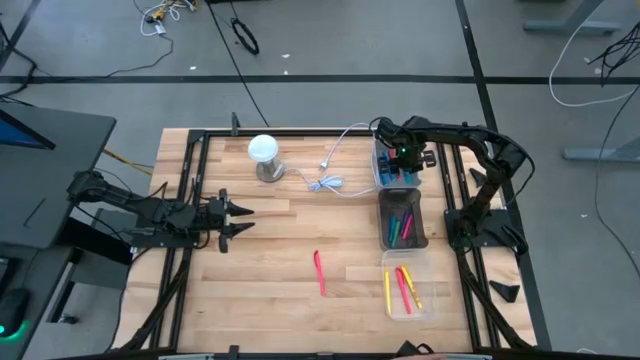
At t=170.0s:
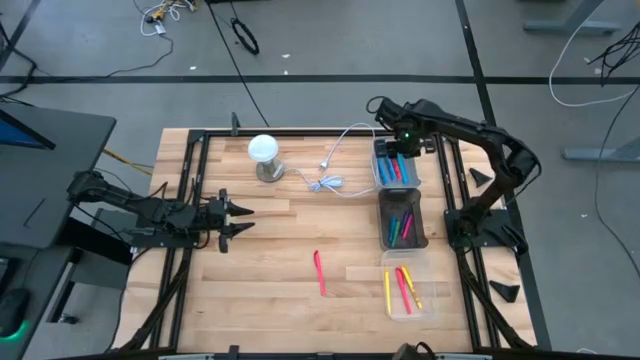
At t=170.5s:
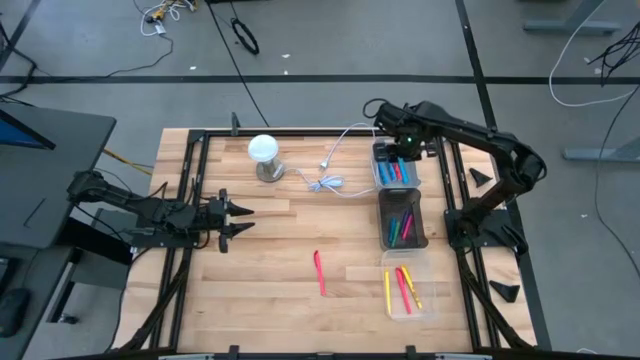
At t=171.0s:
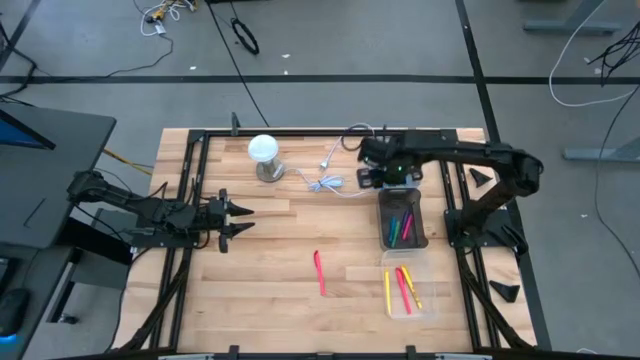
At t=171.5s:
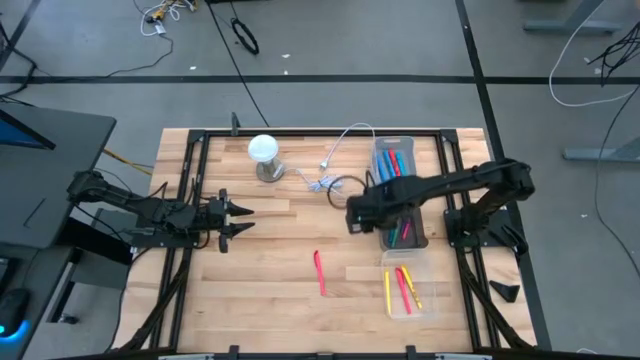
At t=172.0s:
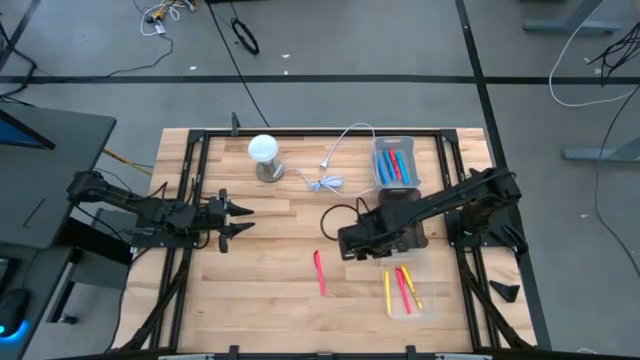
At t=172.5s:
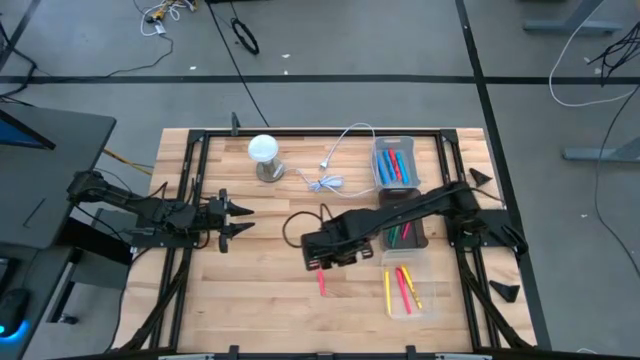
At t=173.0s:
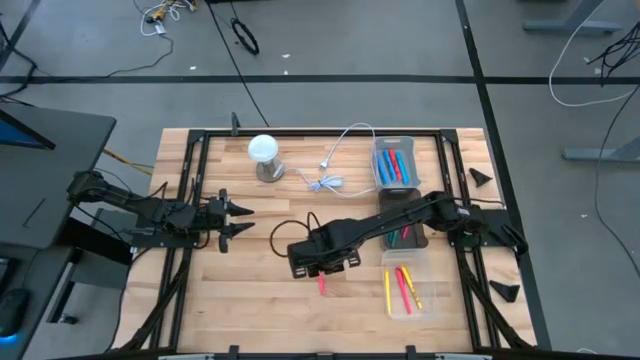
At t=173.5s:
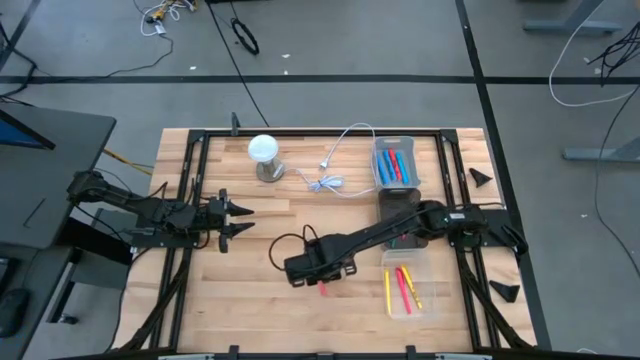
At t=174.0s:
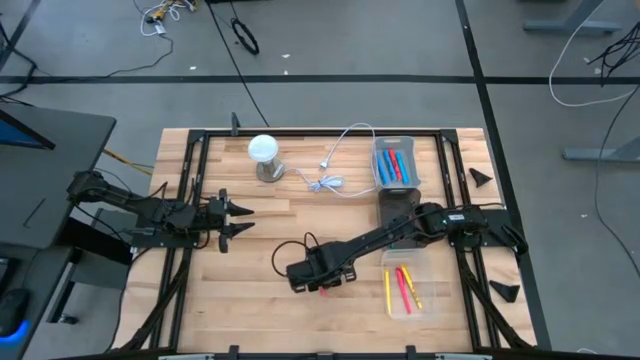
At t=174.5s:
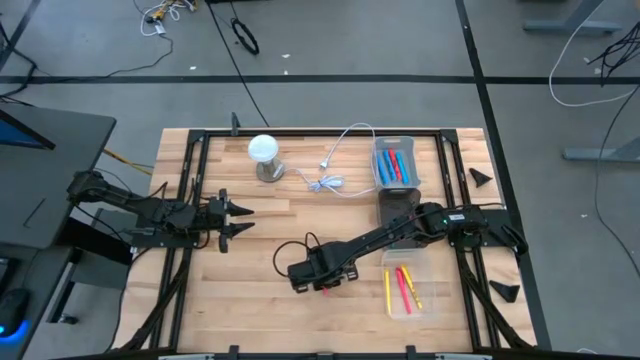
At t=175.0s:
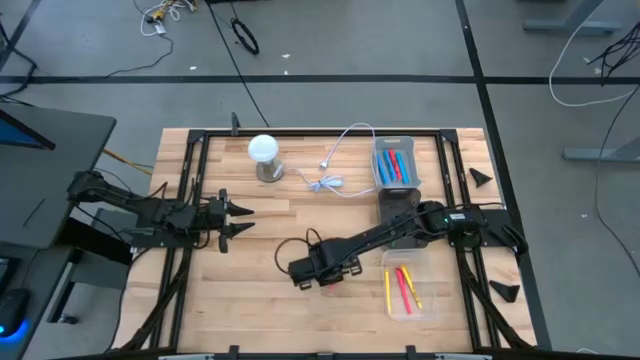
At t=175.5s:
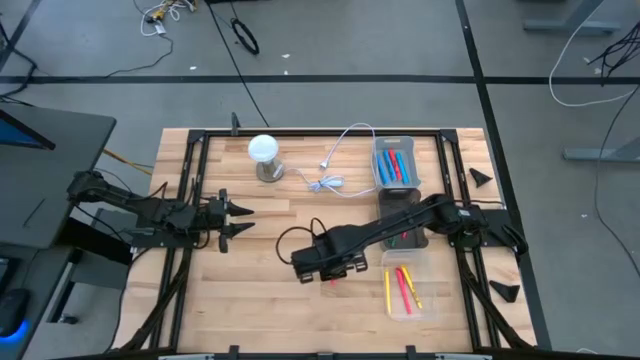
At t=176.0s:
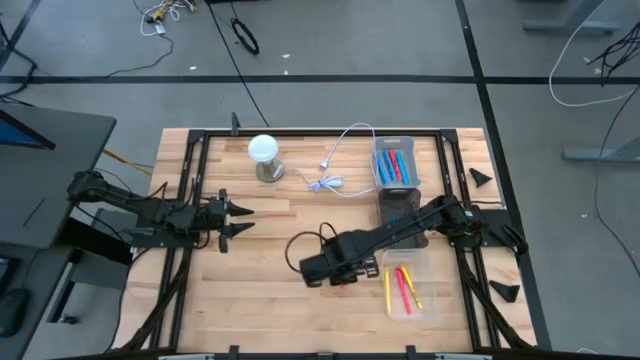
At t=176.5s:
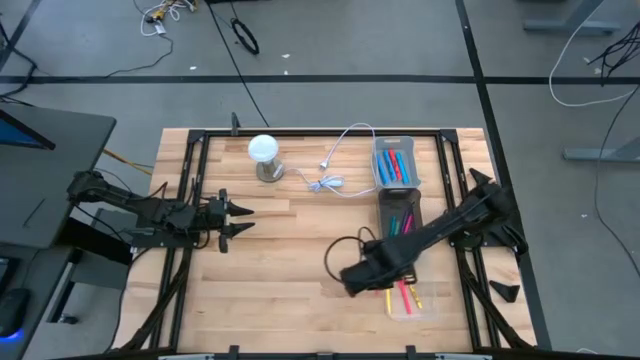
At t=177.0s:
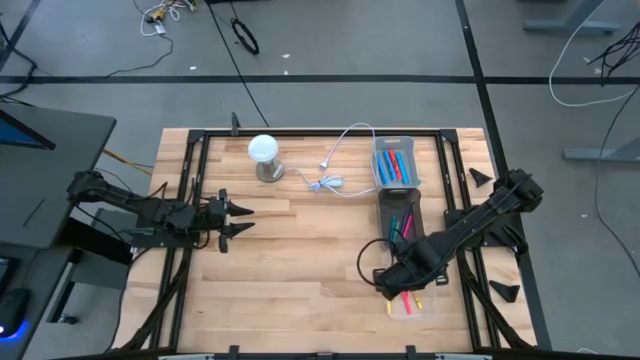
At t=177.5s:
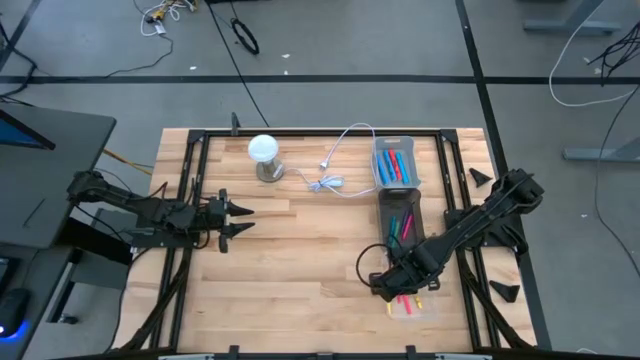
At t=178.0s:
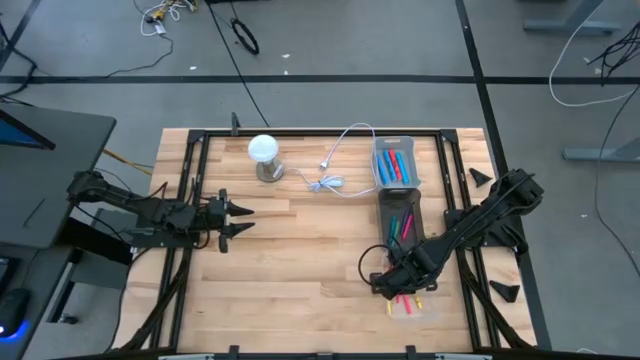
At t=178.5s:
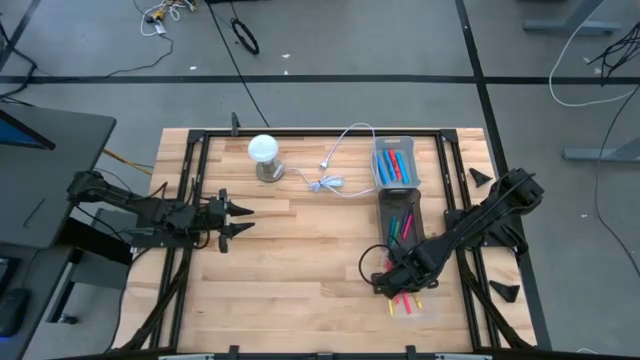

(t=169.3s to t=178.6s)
Task: Pick & Place Markers
Put the pink pen into the transparent bin

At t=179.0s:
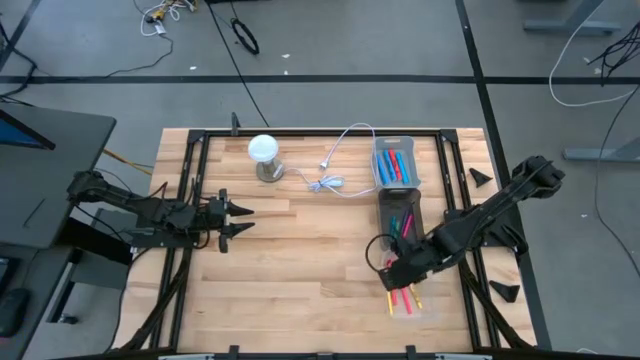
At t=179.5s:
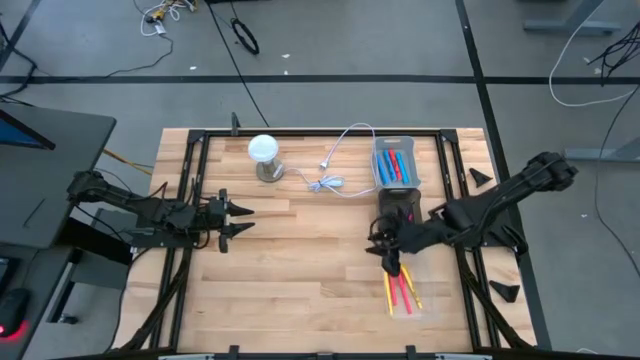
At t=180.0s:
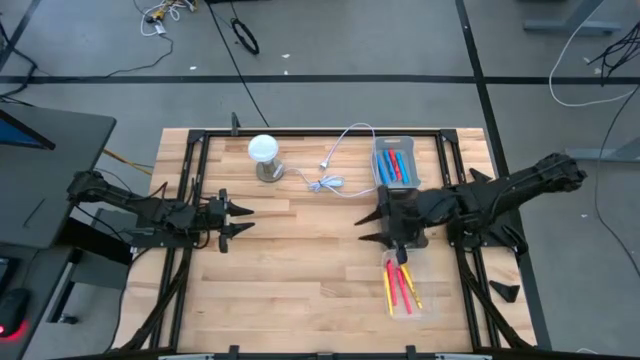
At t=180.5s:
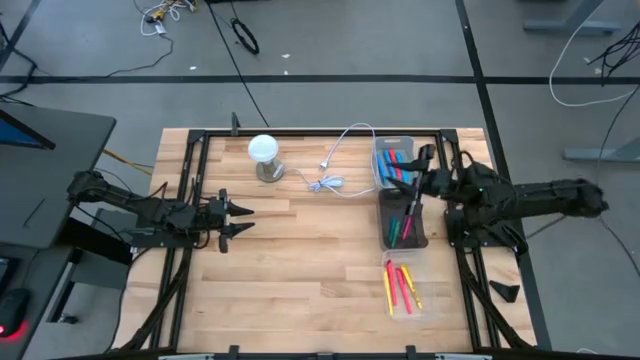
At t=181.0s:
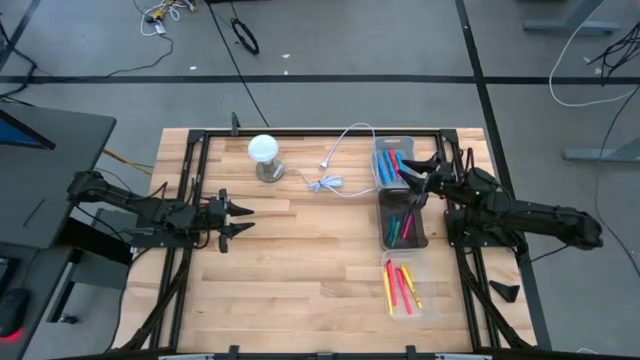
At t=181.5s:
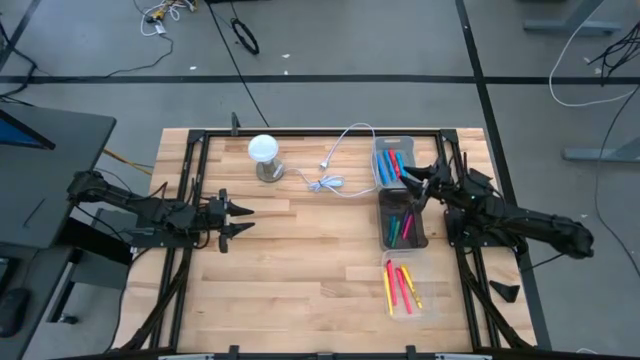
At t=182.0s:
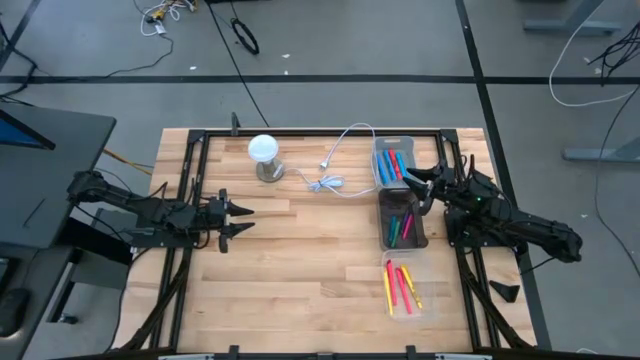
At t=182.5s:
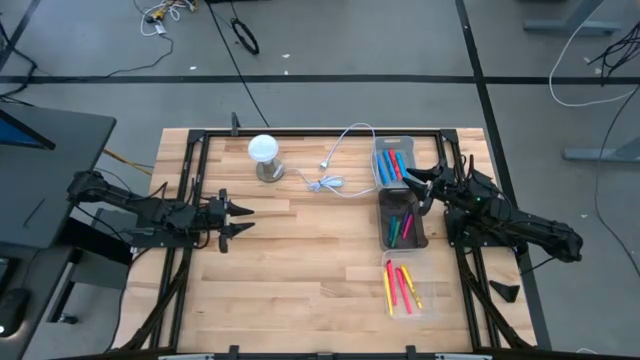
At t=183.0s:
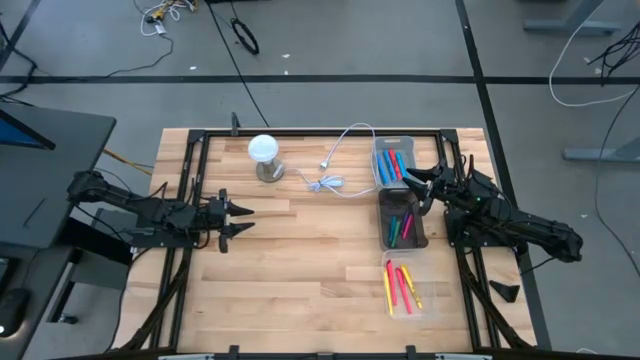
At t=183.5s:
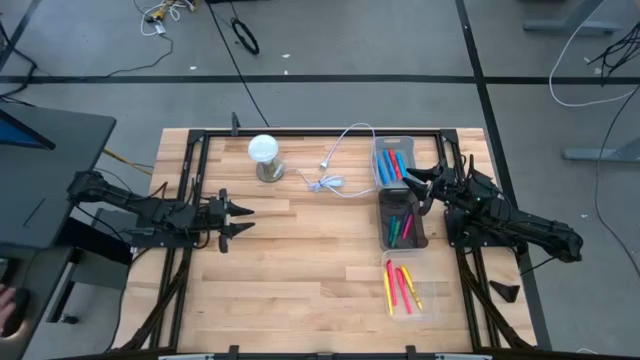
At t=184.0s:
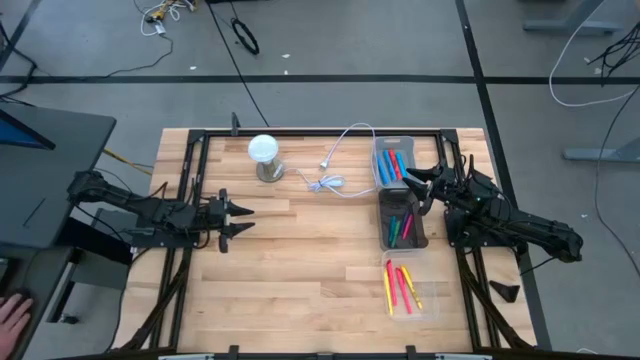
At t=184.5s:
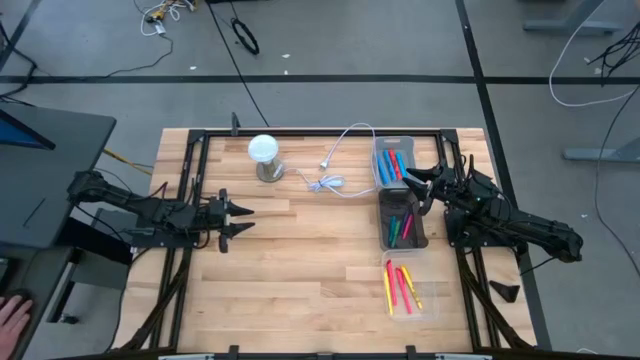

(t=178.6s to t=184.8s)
Return to Home Position

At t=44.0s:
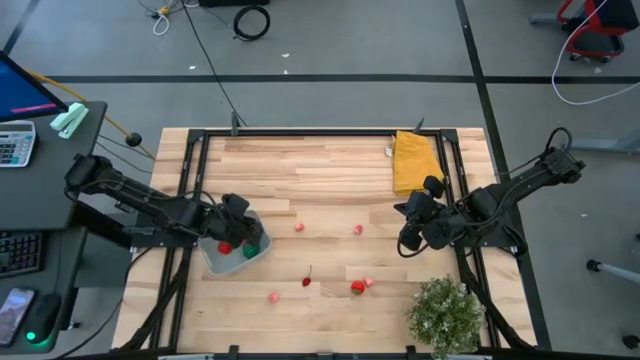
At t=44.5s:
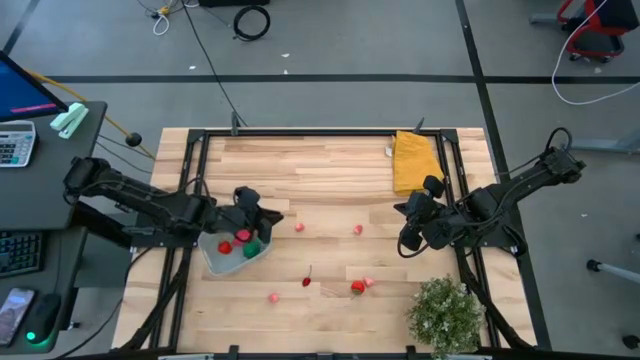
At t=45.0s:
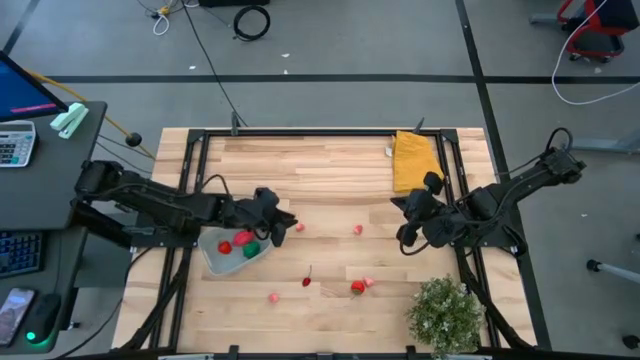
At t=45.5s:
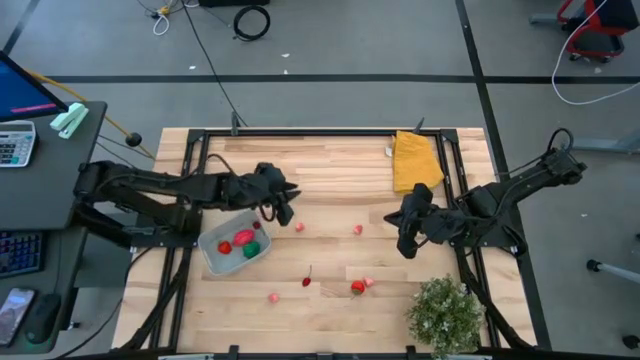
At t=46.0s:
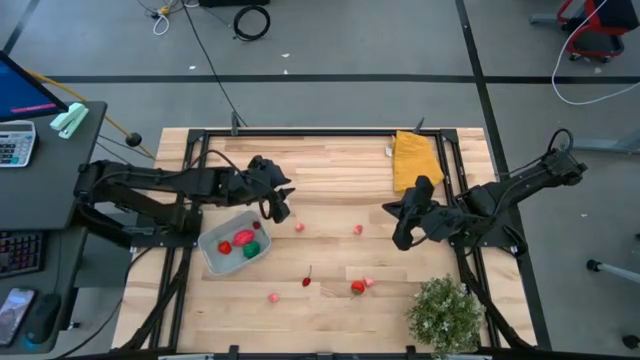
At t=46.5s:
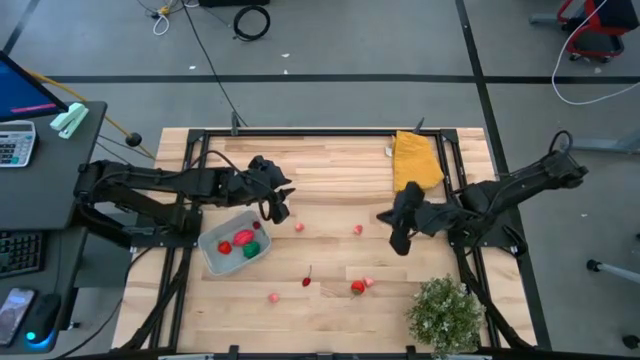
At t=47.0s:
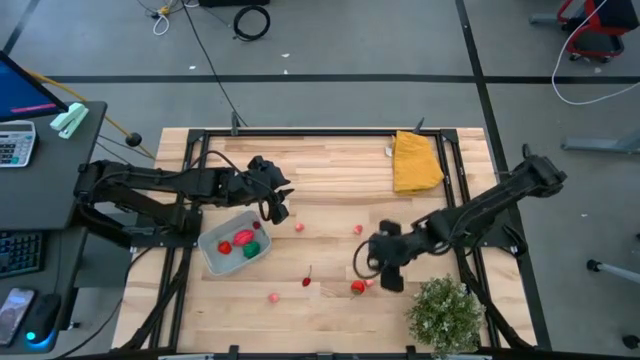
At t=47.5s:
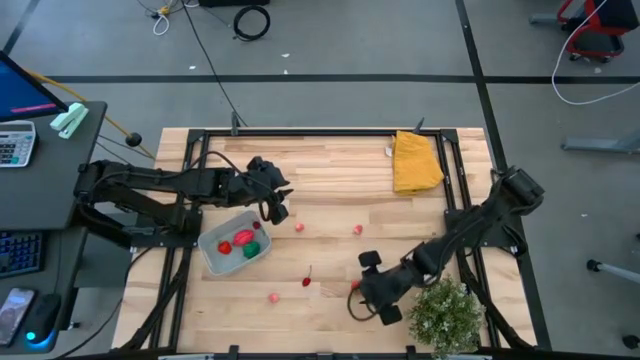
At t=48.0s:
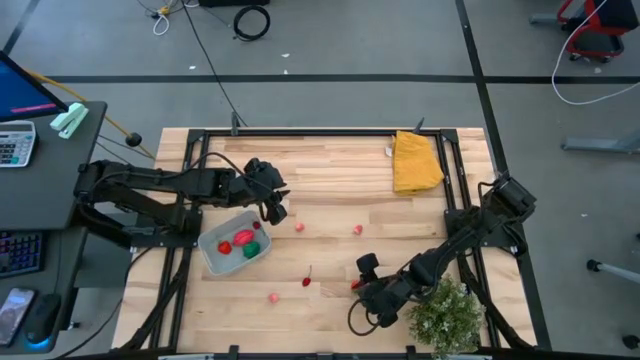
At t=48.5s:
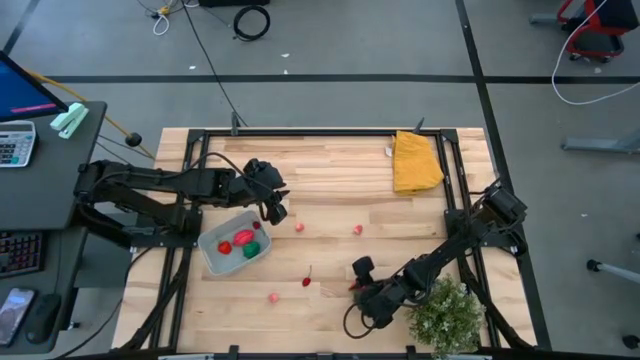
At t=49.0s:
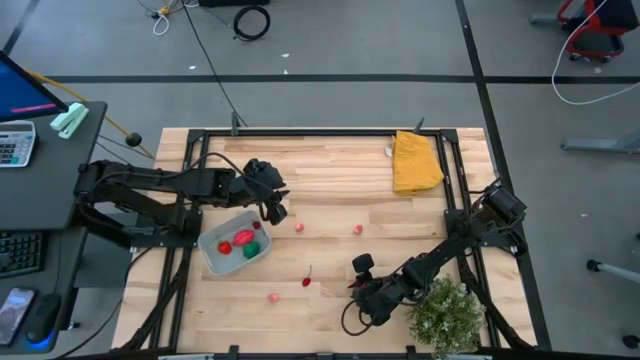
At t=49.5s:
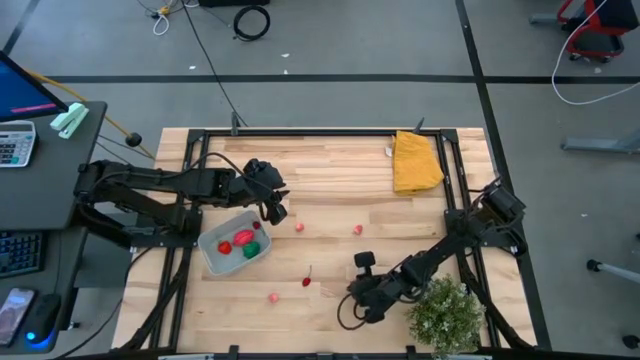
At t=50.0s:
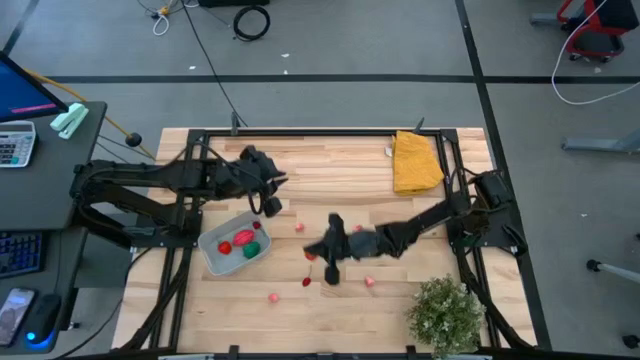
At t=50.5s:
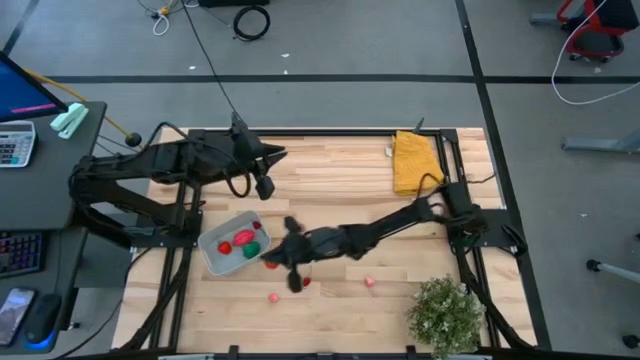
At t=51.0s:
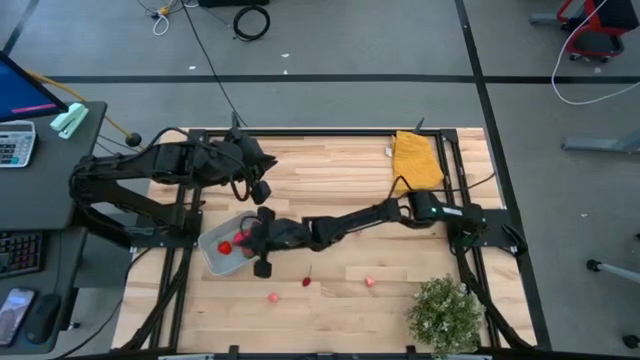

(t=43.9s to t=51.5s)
Task: Pick and placing Produce into tupperware
Put the red strawberry into the gray bin
